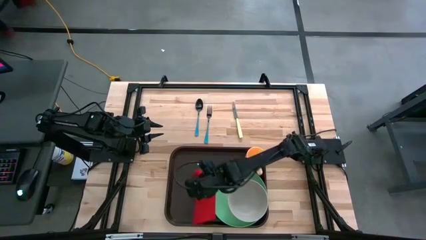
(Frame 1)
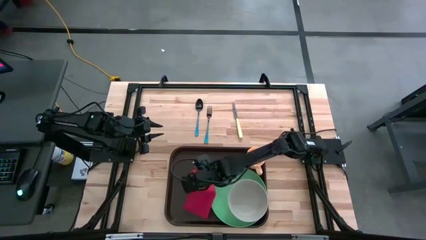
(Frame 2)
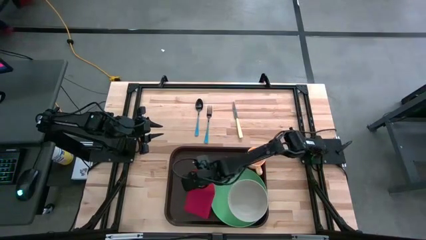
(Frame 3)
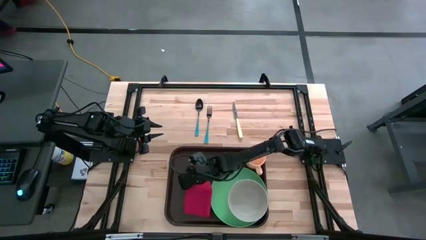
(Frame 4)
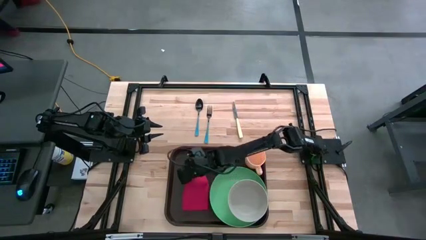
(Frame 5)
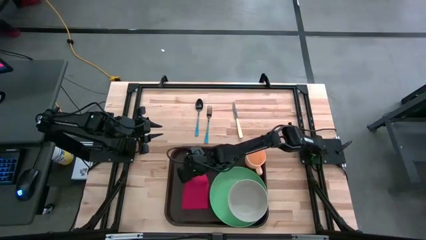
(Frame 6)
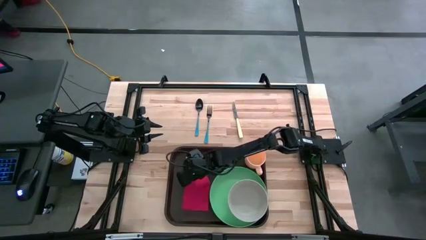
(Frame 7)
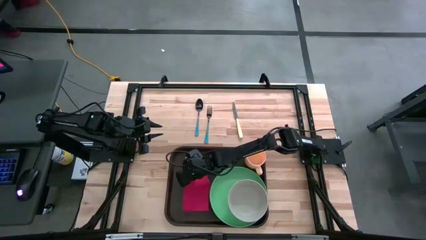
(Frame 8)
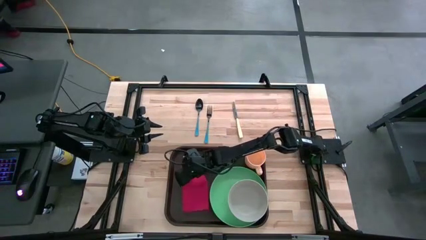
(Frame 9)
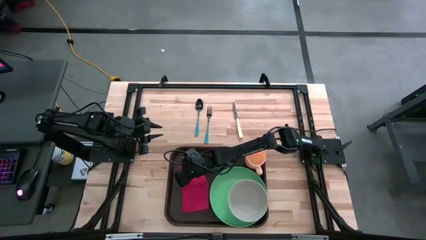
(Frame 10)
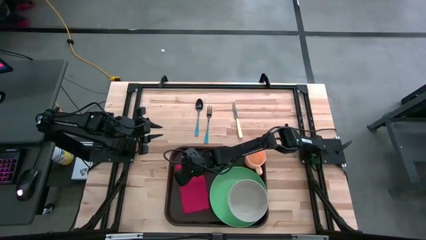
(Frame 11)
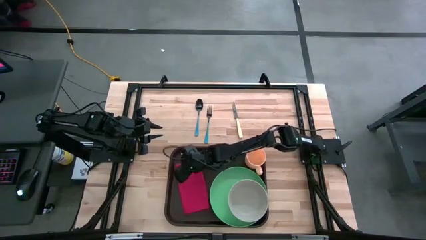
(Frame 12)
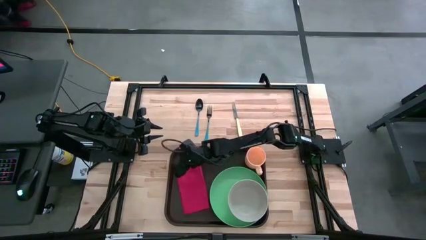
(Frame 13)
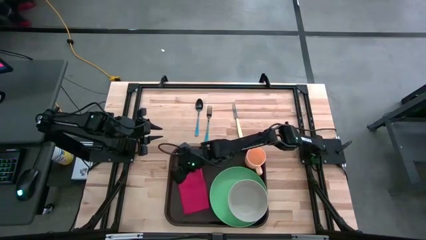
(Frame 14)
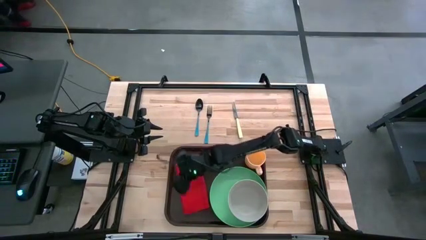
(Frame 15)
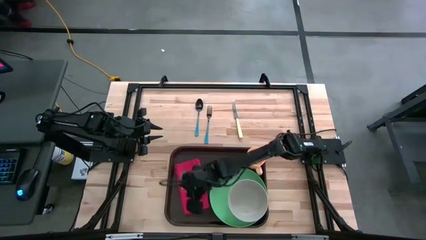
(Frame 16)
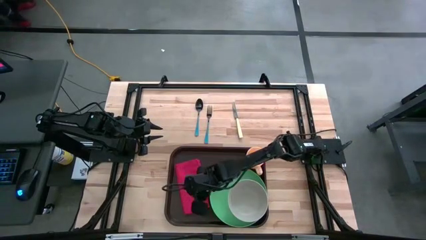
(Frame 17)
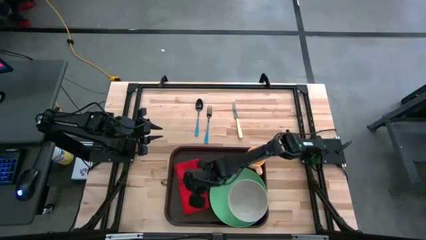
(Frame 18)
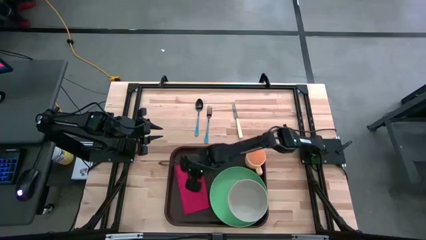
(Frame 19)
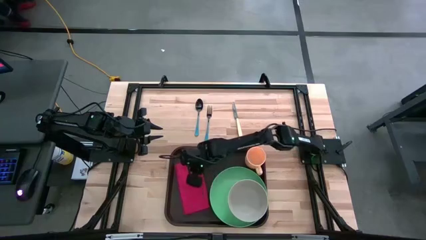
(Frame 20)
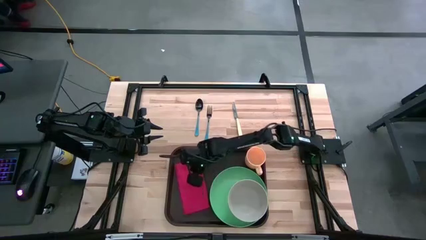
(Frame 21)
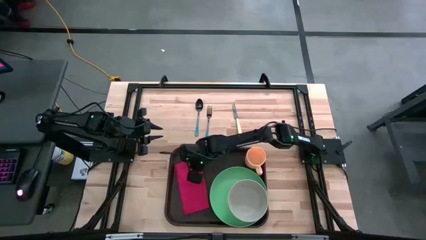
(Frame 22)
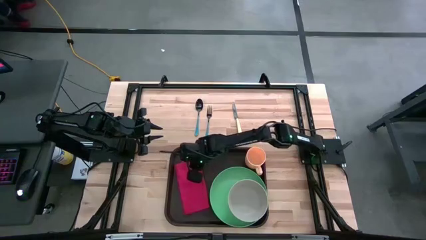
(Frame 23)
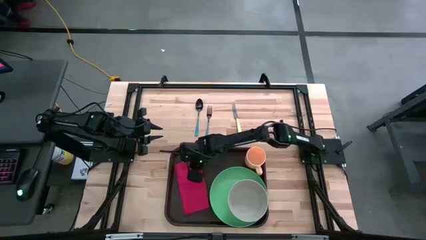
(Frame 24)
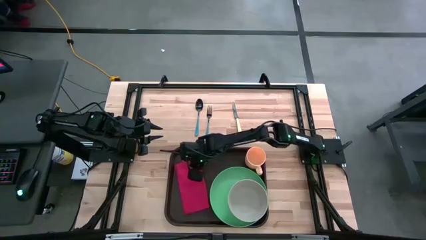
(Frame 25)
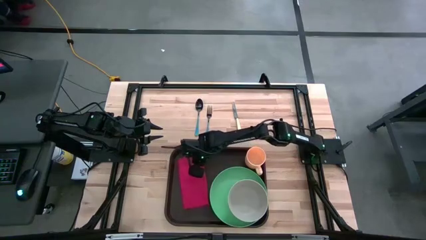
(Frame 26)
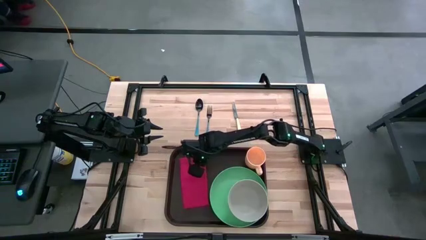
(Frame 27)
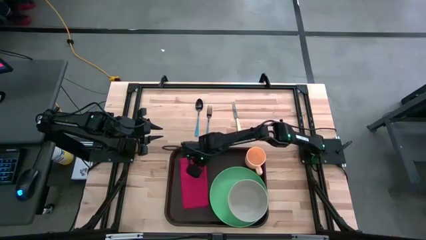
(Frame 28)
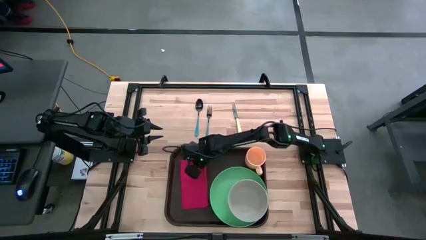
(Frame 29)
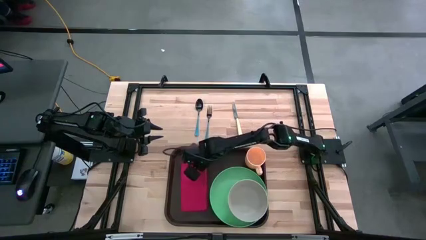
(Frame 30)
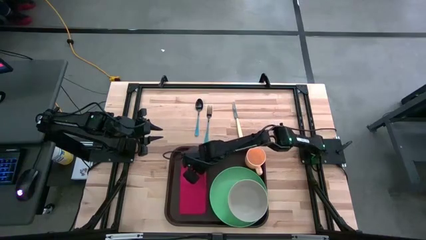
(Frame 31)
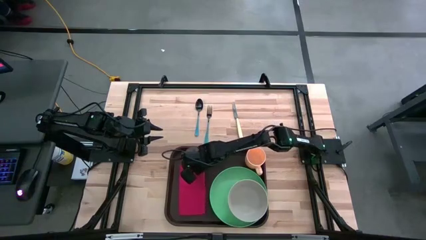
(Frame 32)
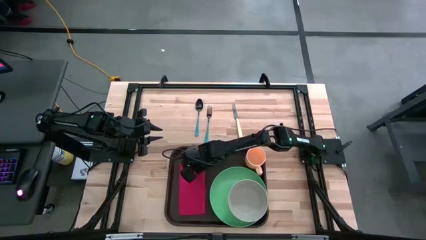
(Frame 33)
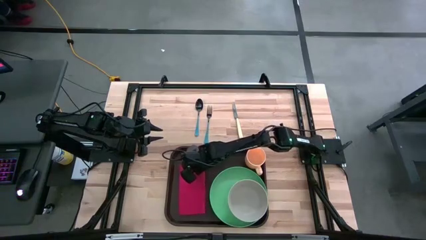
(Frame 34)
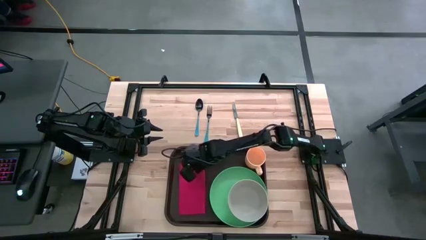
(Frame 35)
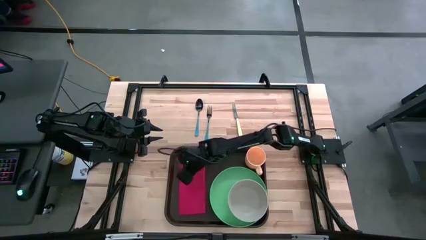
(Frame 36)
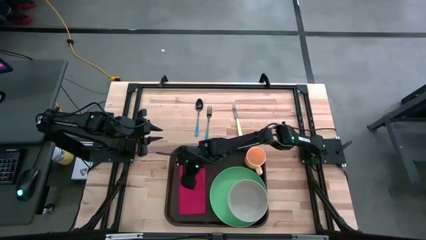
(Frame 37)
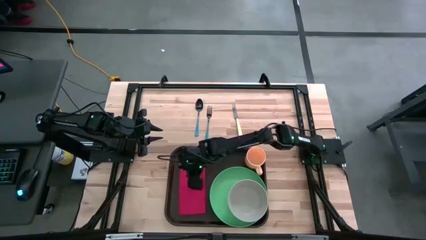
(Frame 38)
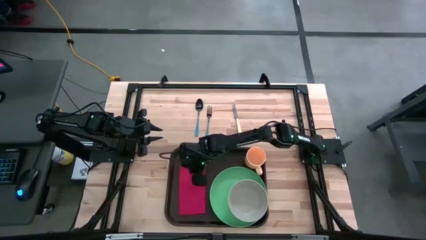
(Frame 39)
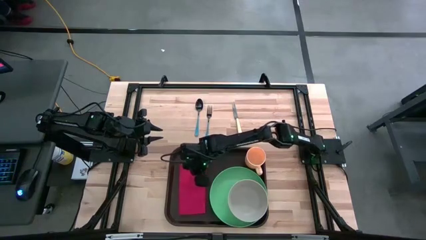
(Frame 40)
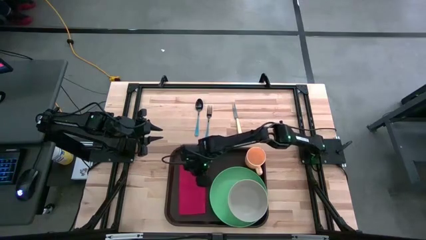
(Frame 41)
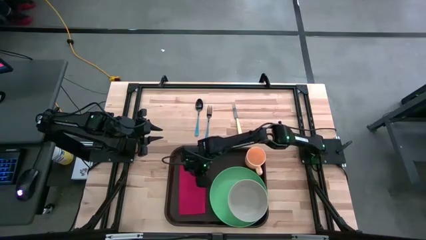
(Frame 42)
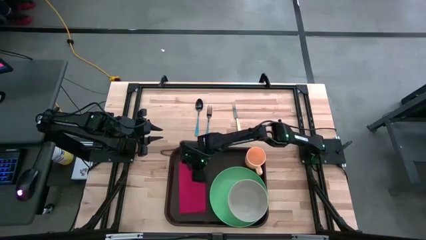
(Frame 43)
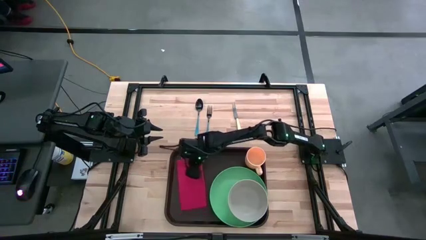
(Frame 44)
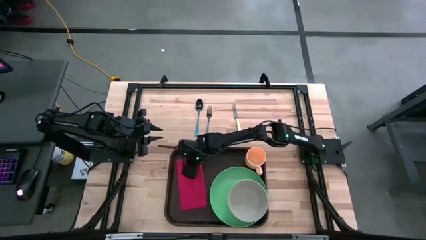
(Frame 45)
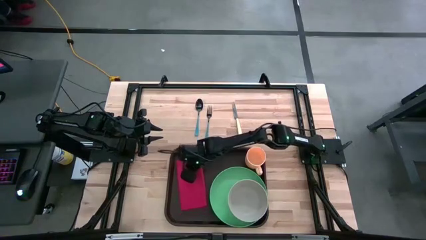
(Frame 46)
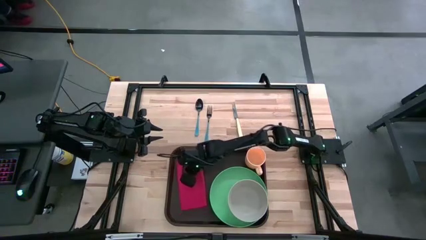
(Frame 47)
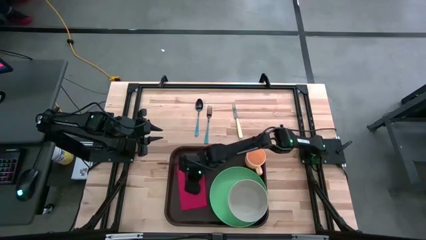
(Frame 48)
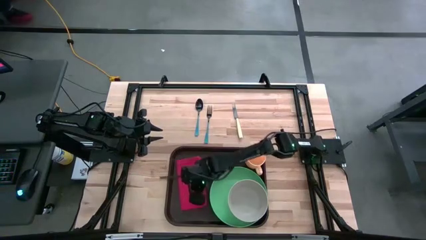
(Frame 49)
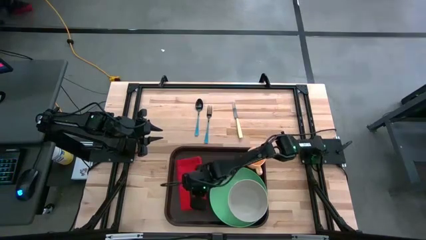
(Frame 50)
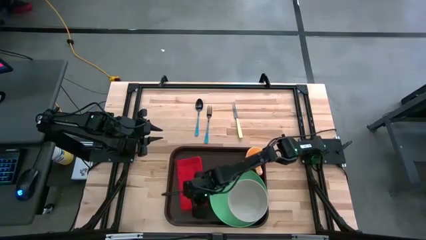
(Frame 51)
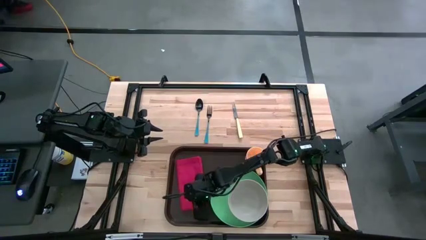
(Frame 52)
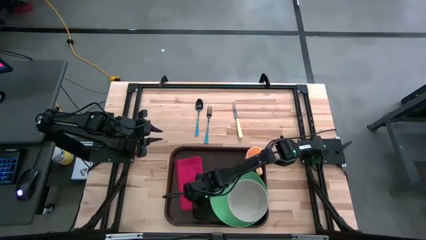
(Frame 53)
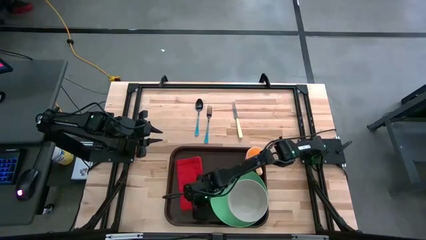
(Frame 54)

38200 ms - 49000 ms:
Task: Set up tray
Put the red napkin on the brown tray to the left of the green plate

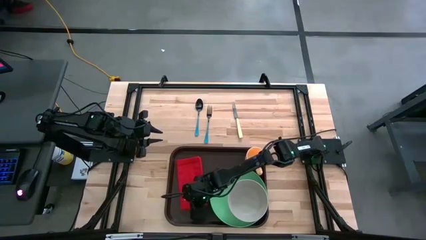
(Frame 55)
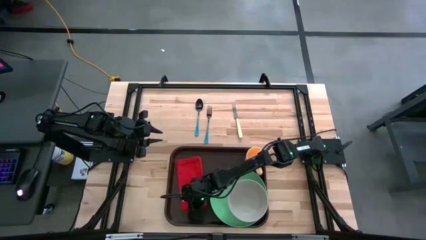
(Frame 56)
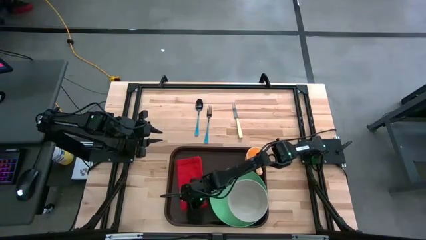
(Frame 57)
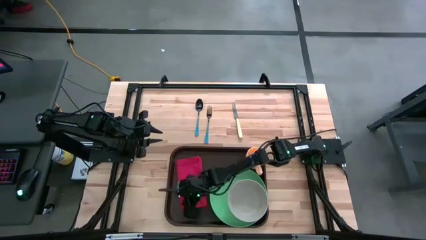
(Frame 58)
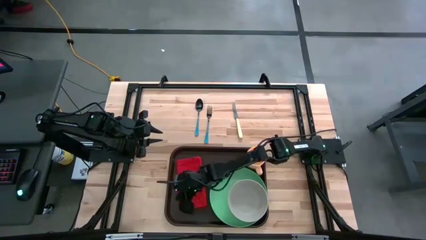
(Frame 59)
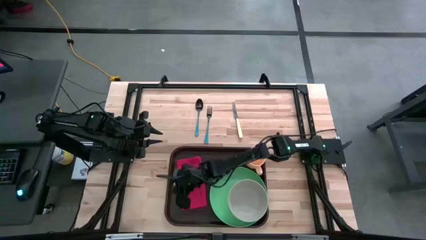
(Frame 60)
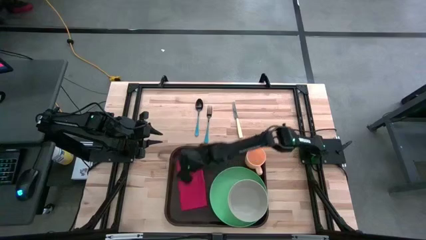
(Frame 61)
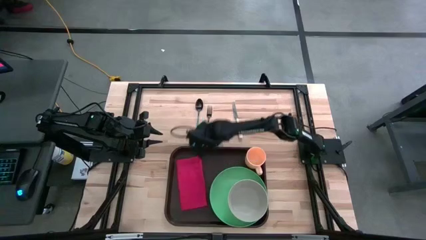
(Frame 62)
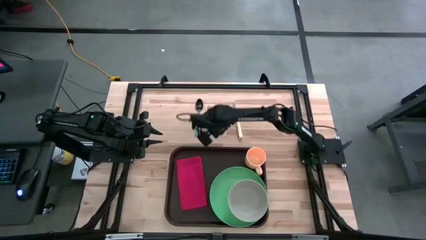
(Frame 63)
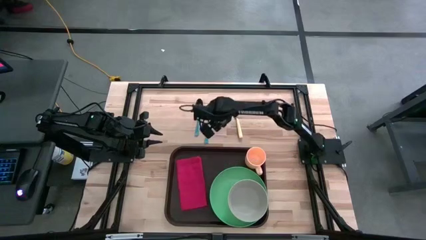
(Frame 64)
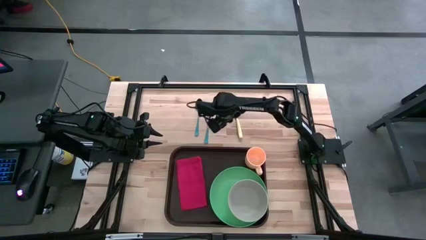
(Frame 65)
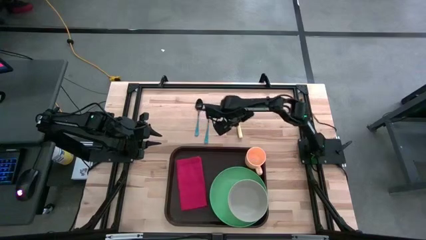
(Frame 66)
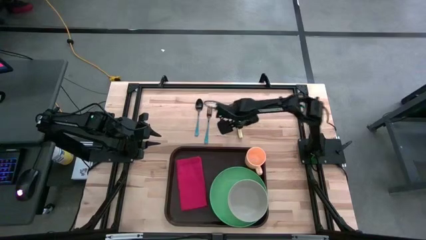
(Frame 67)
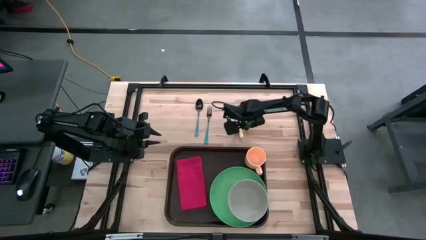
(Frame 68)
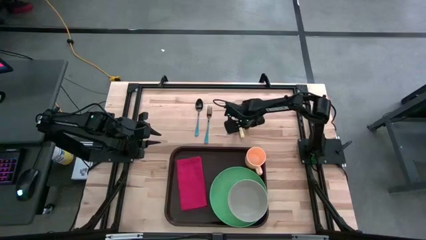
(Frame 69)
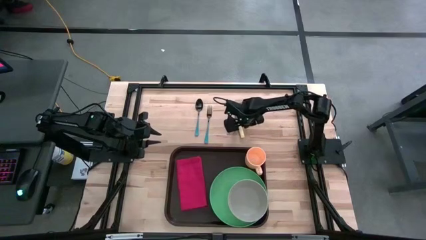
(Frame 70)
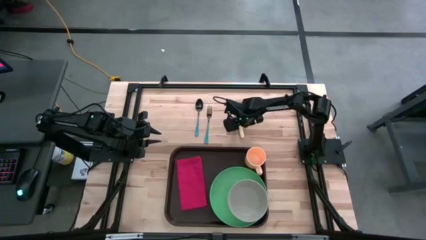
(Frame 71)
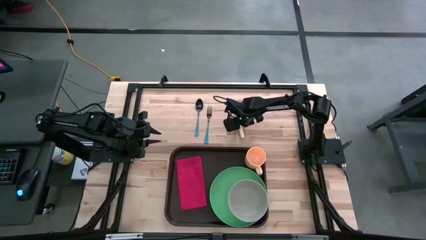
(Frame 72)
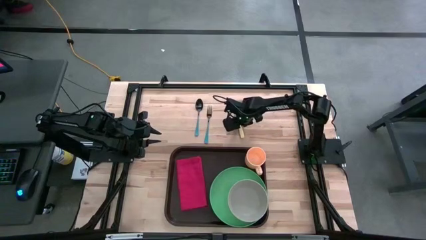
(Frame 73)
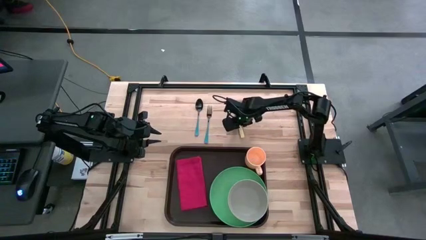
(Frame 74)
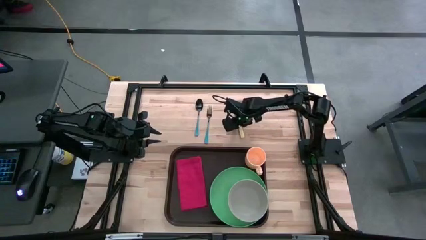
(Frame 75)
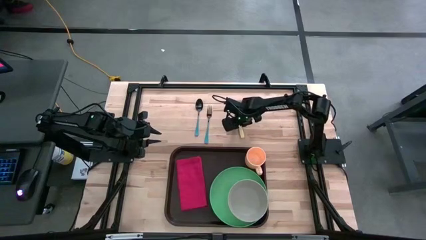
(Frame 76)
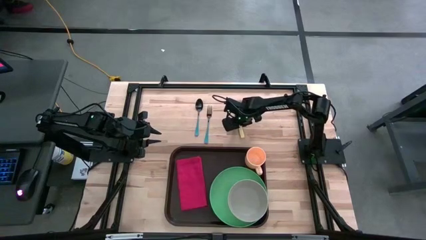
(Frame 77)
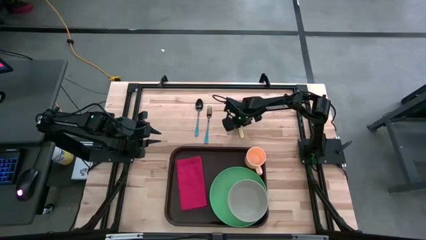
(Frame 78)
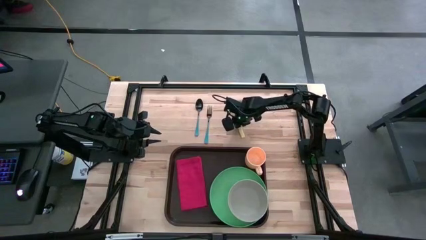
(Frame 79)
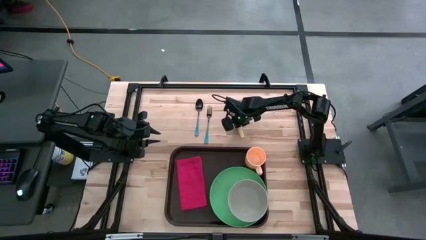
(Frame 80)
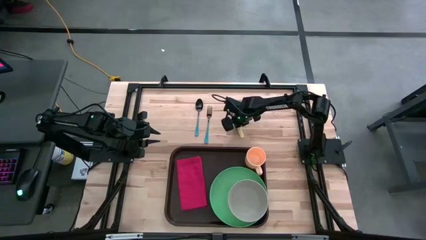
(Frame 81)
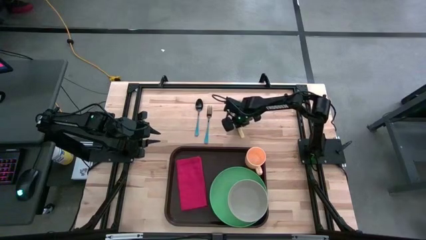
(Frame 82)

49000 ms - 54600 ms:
Put the yellow knife on top of the red napkin
